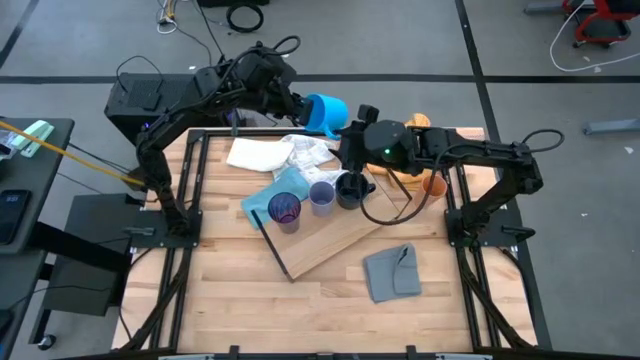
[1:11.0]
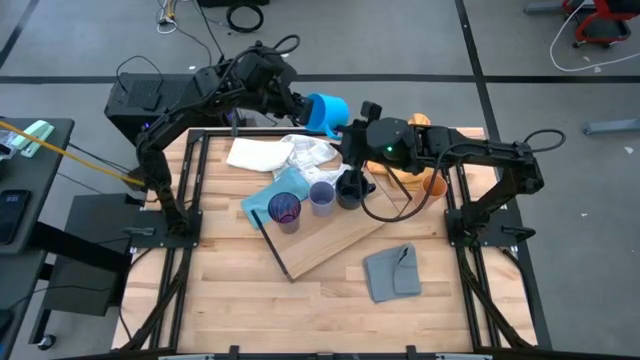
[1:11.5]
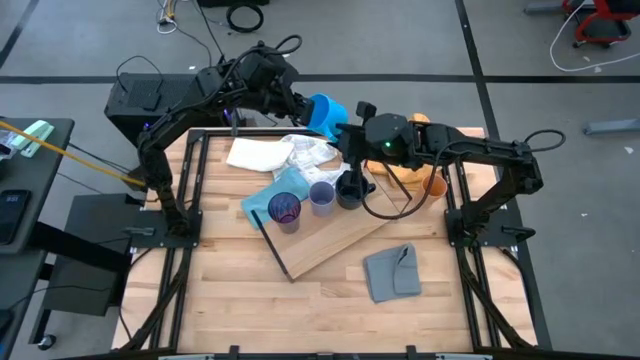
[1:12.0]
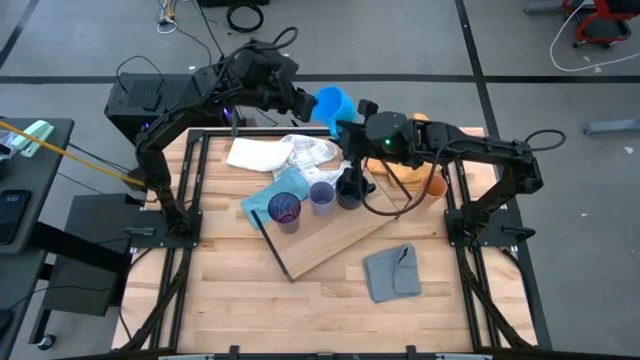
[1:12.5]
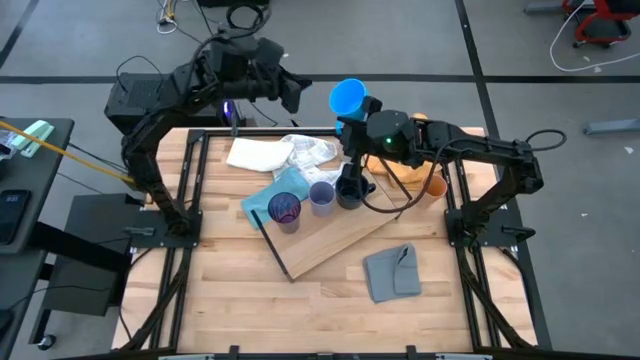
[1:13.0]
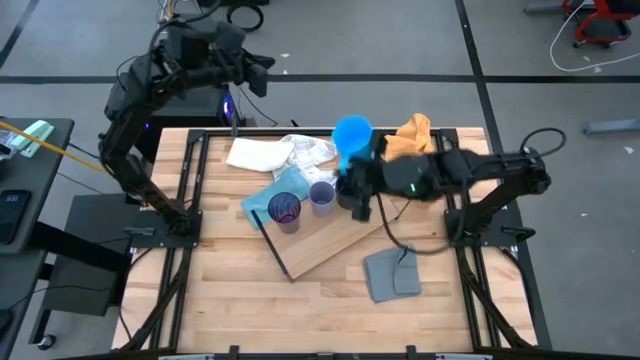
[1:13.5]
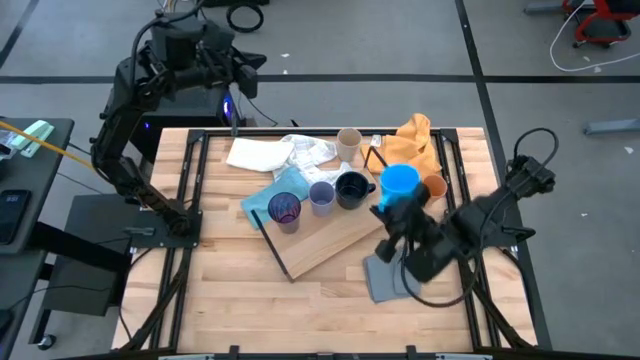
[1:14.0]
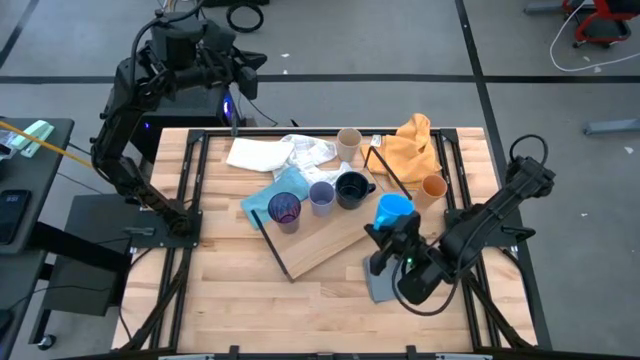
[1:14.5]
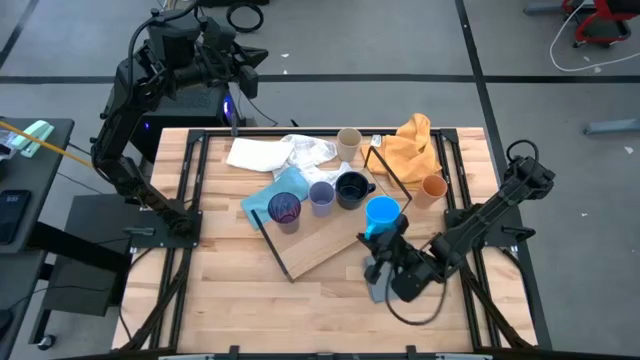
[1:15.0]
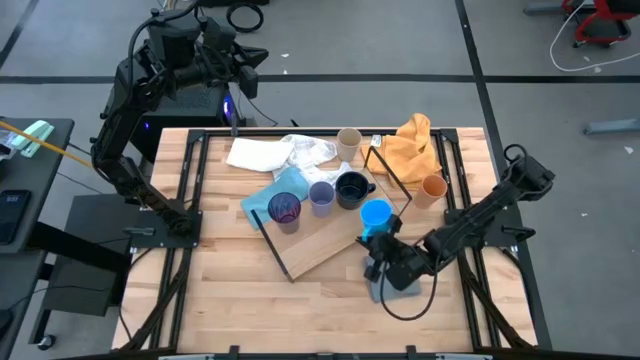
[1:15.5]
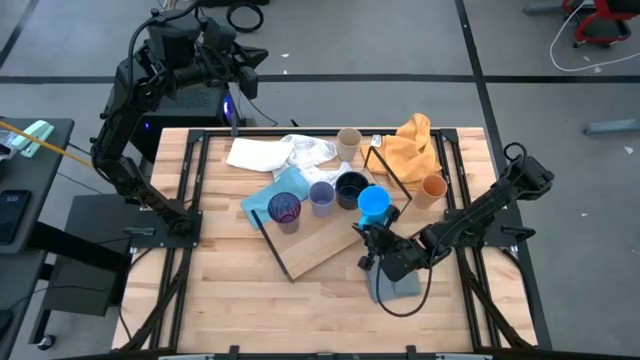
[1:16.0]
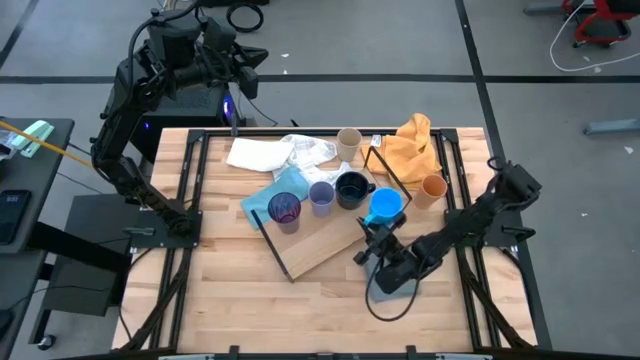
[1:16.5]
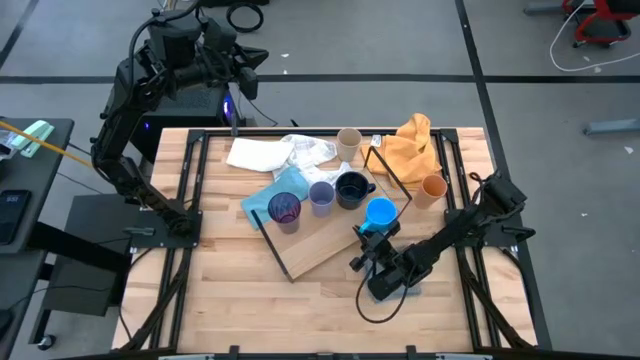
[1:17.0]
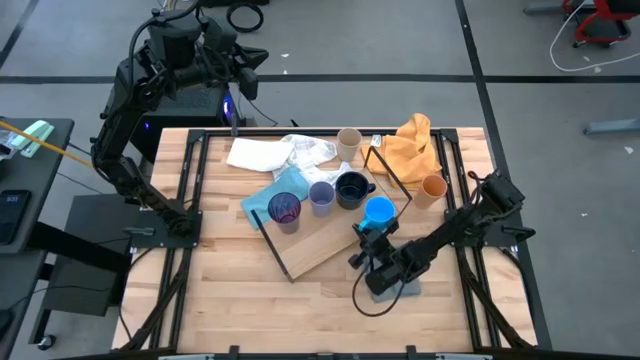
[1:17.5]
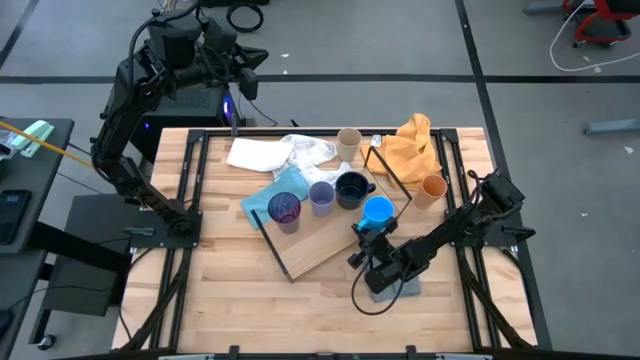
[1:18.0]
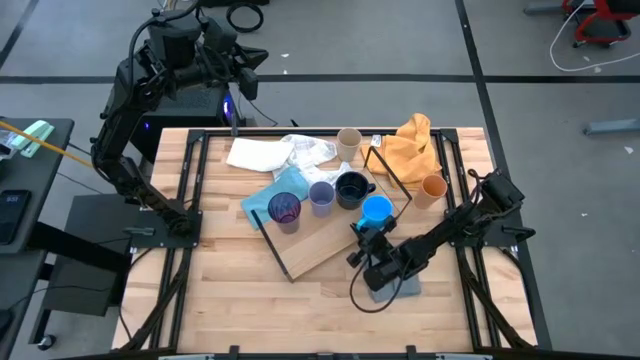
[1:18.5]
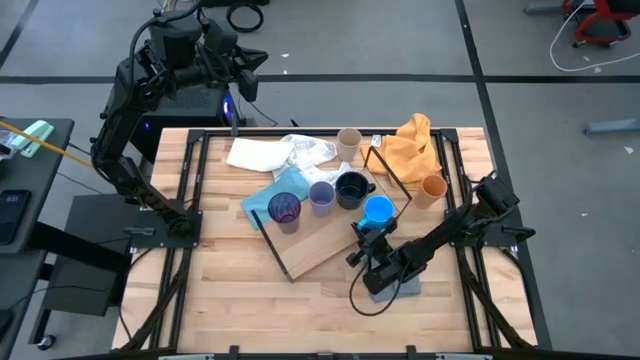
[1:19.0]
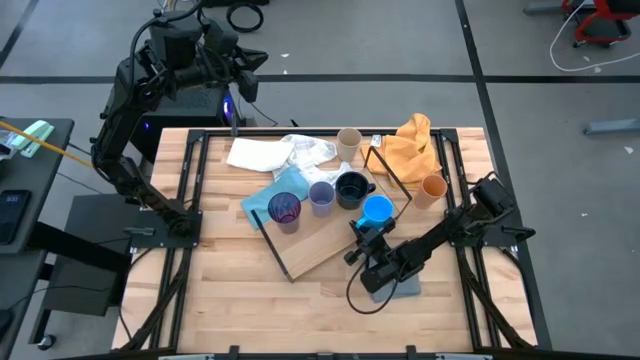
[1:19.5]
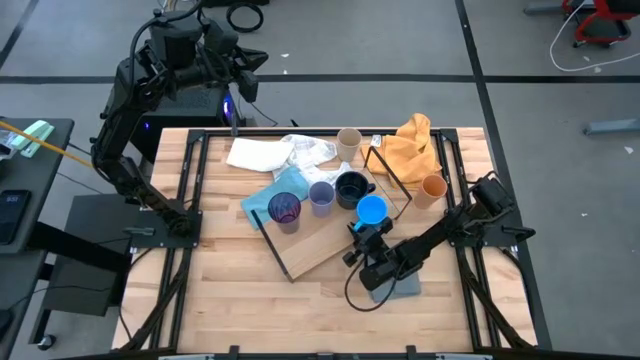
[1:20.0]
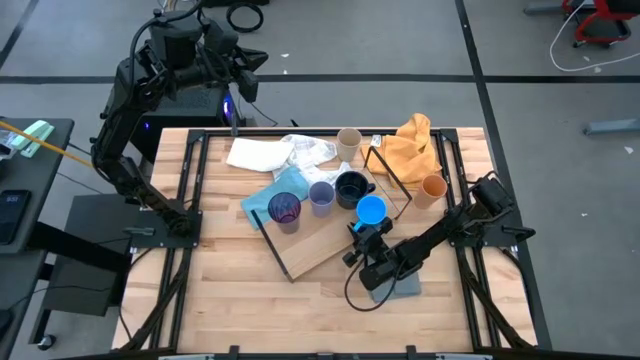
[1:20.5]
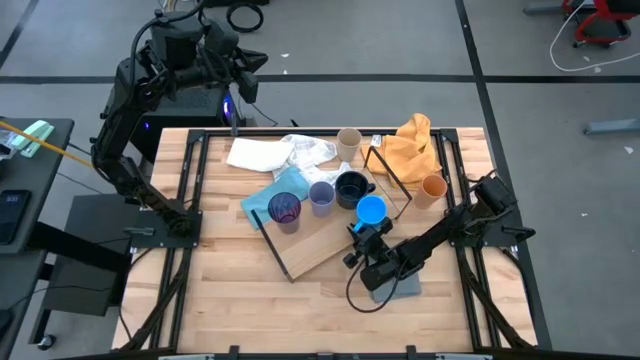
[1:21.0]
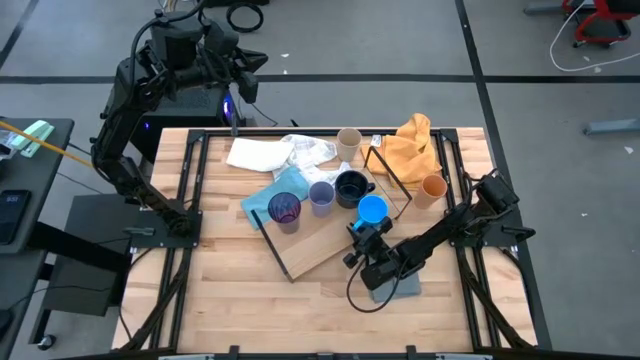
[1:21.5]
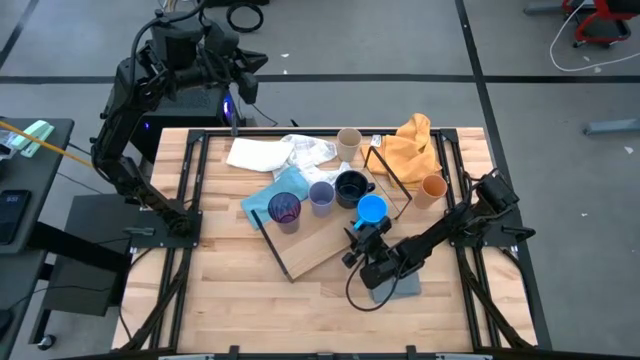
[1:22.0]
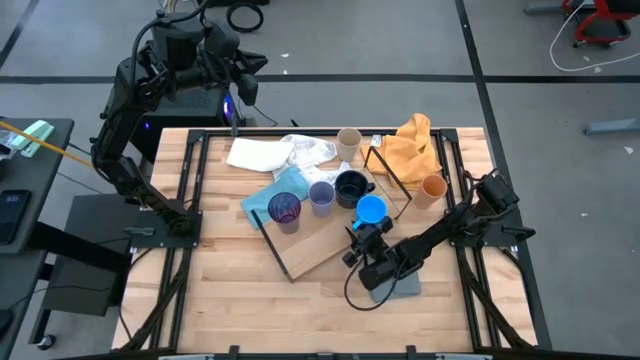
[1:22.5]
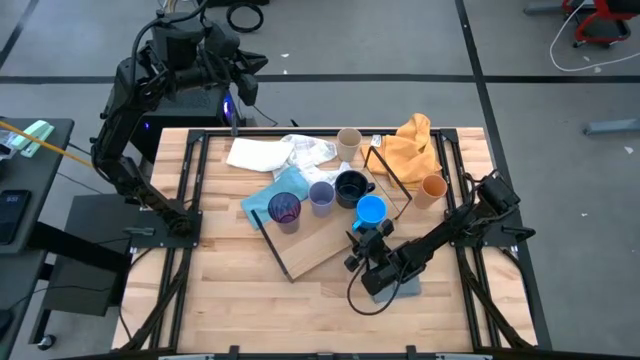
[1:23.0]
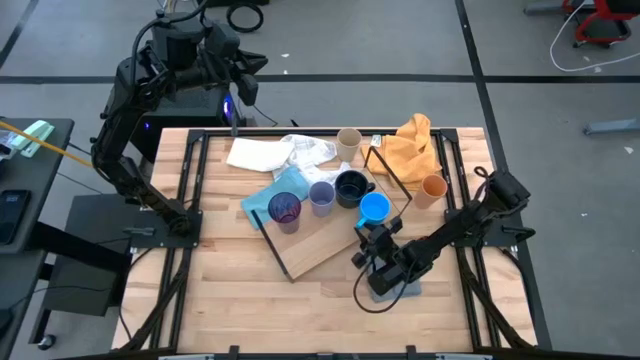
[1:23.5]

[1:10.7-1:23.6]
Task: Stack small to large cups/mugs on shelf
Put the blue mug on the shelf

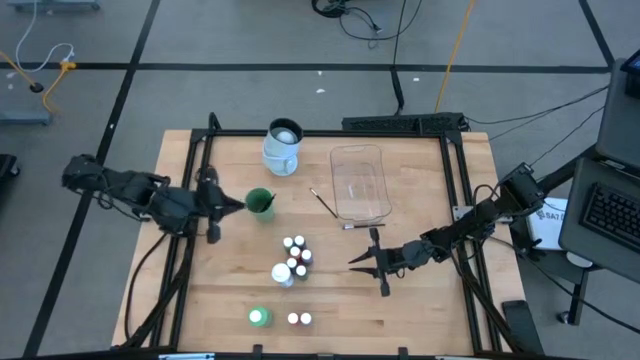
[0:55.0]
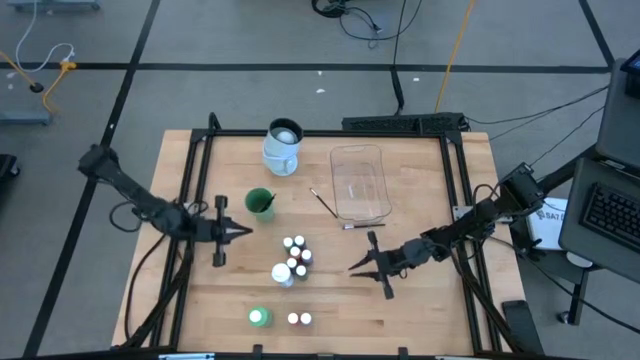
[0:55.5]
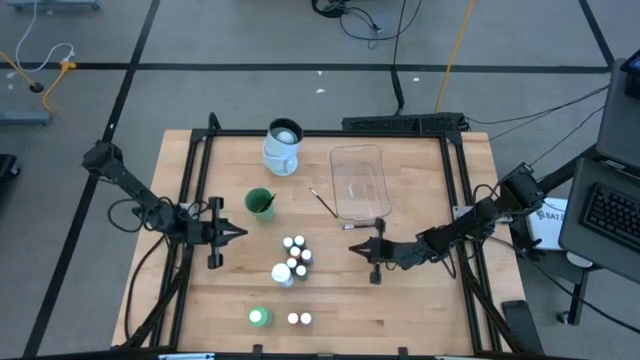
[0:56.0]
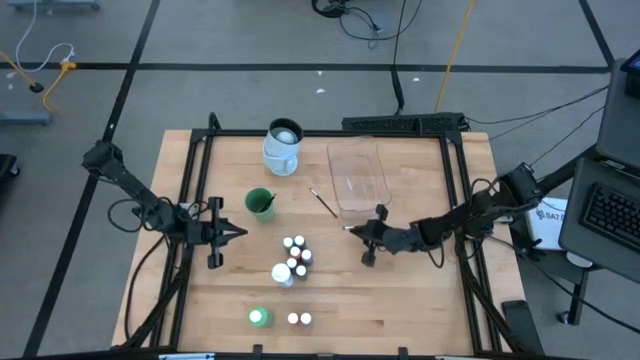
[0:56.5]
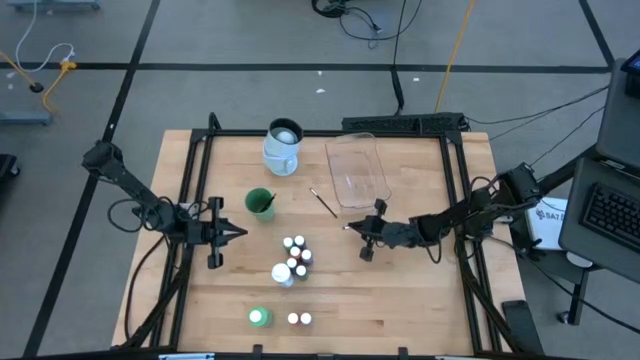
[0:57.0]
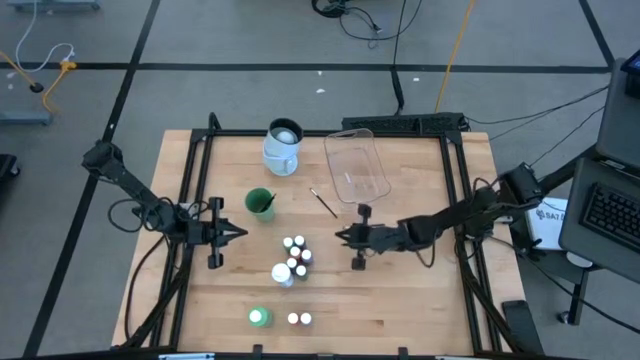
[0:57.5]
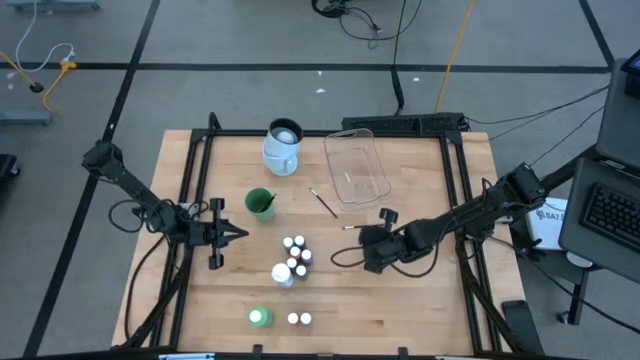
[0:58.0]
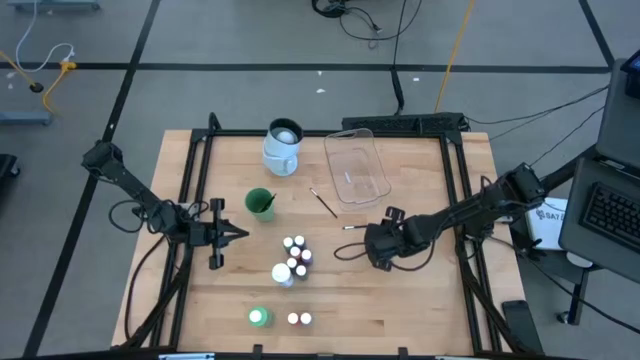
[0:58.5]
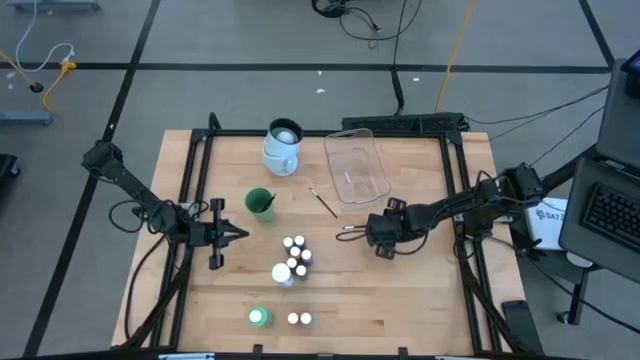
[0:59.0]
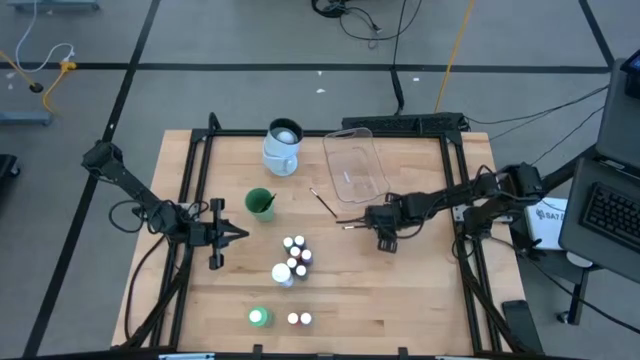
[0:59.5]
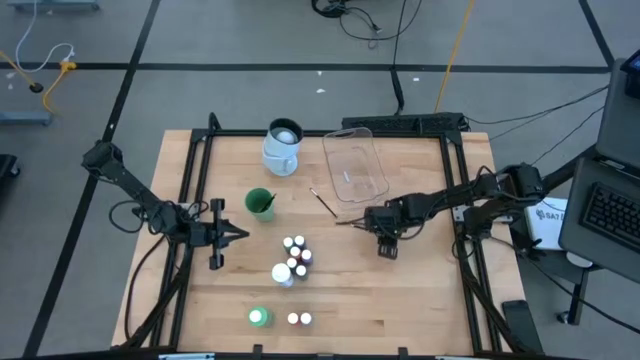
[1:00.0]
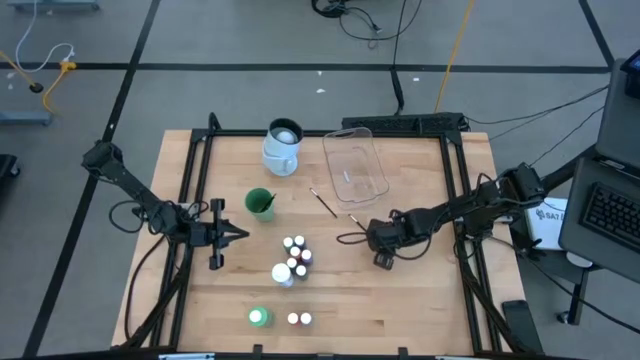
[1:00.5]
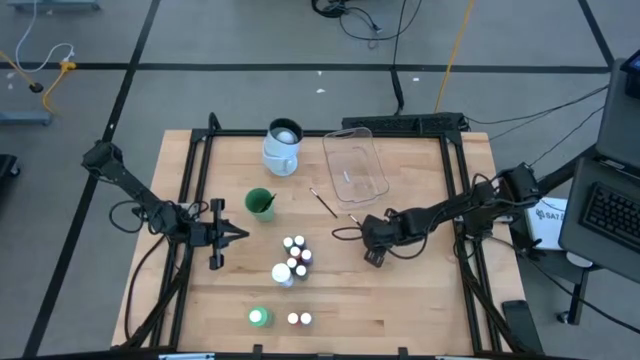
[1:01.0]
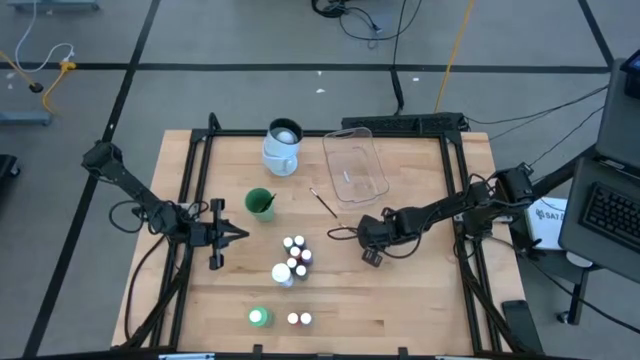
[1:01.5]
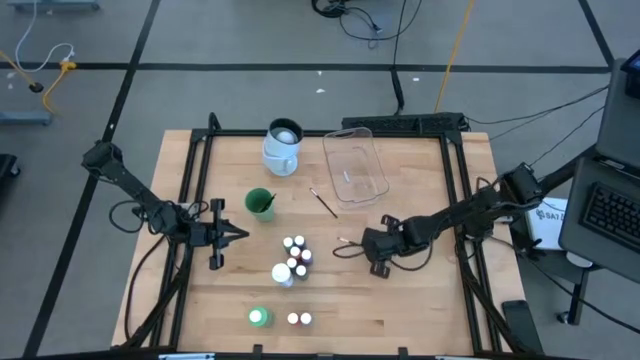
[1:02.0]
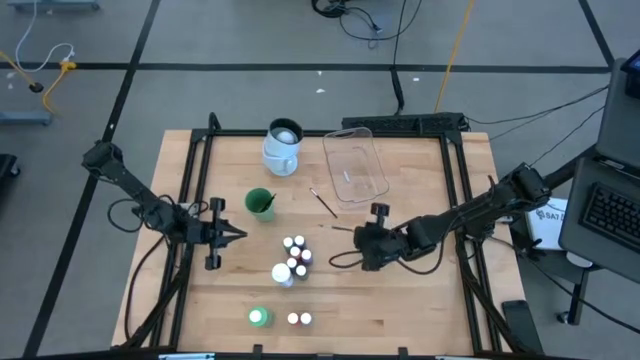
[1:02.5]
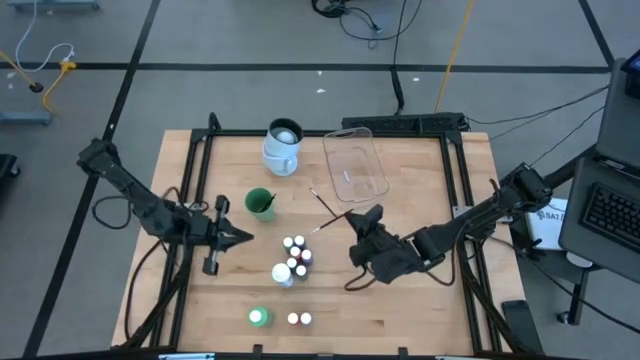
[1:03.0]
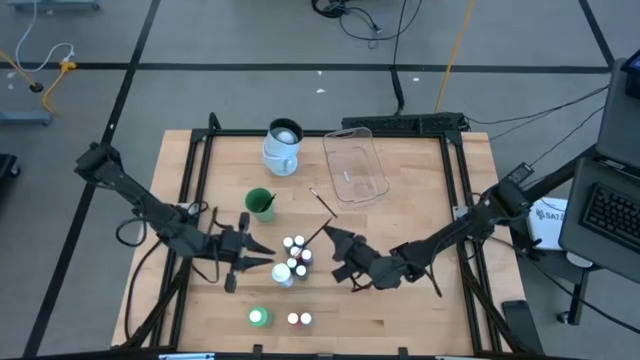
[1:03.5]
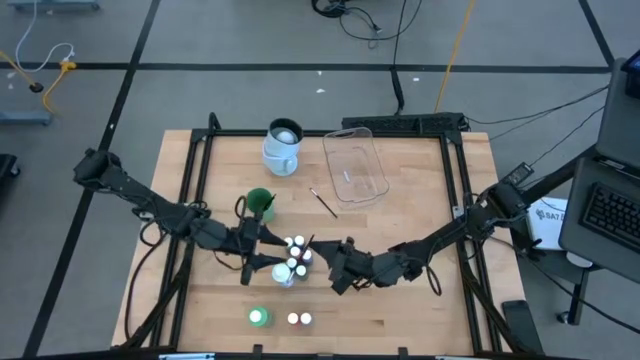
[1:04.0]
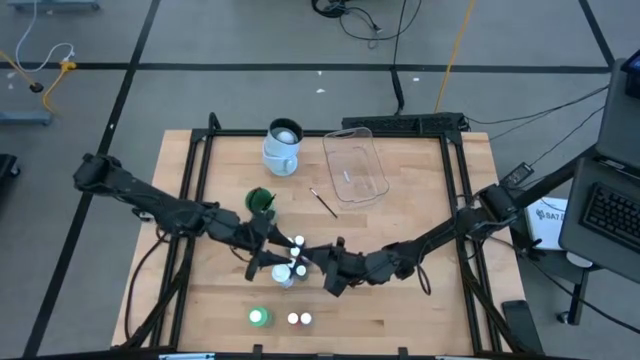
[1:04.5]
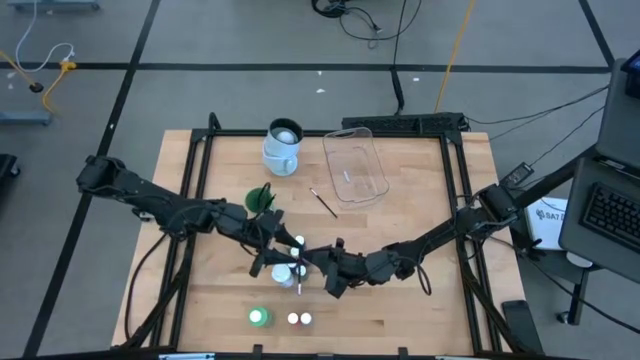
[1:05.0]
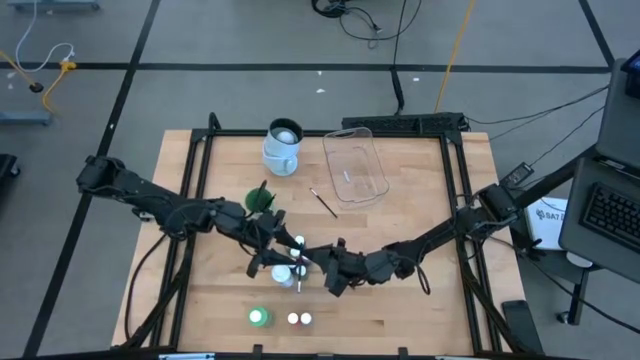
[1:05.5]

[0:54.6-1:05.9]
Task: Pick & Place Paint Supplies
Put the silver paintbrush into the green cup
